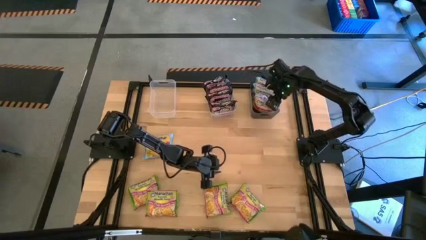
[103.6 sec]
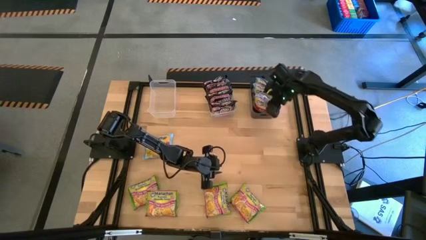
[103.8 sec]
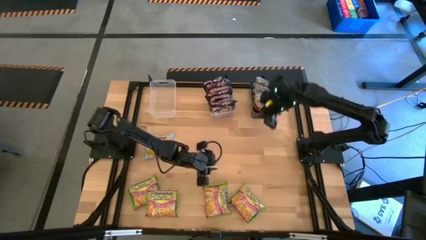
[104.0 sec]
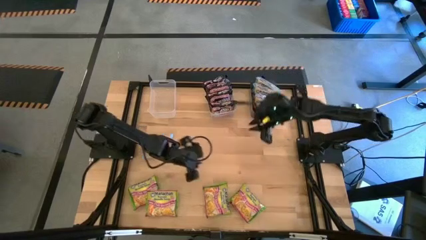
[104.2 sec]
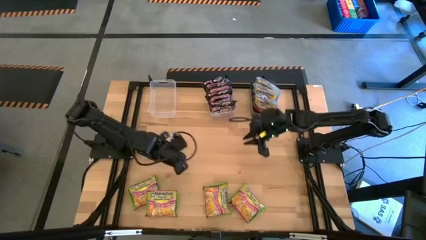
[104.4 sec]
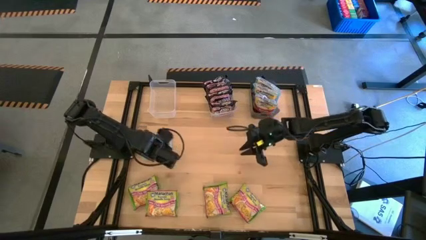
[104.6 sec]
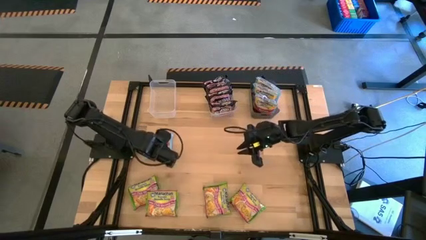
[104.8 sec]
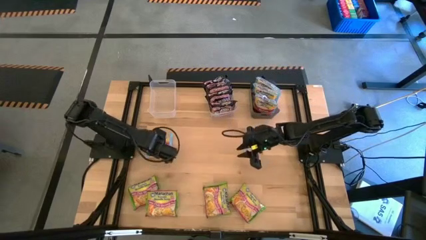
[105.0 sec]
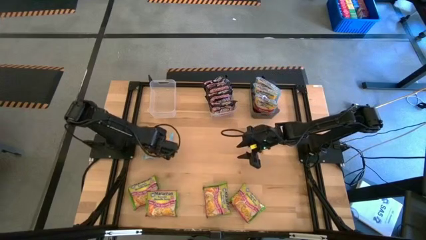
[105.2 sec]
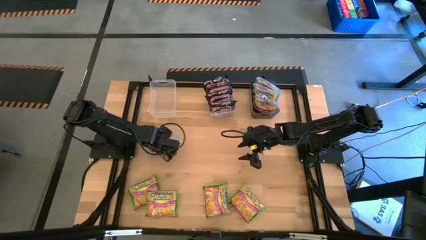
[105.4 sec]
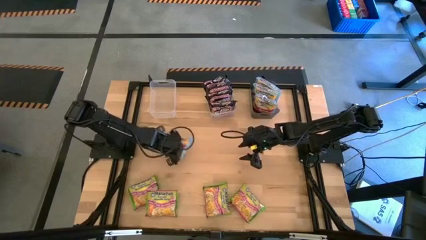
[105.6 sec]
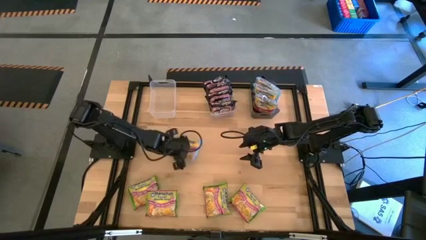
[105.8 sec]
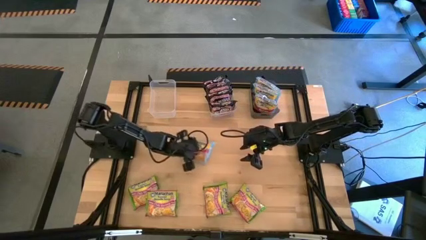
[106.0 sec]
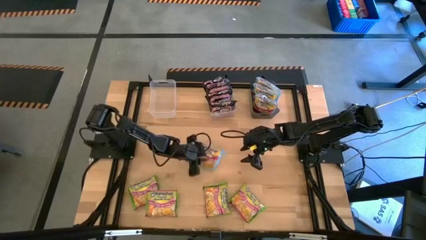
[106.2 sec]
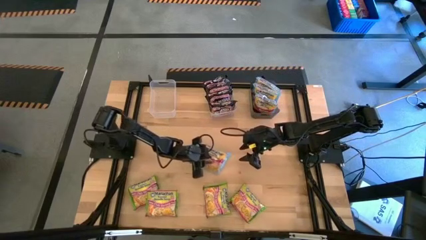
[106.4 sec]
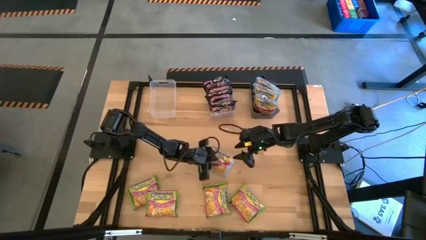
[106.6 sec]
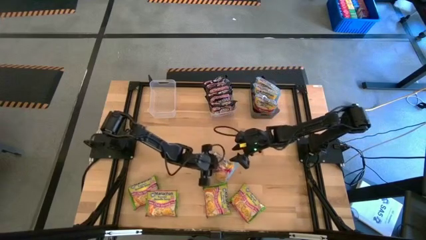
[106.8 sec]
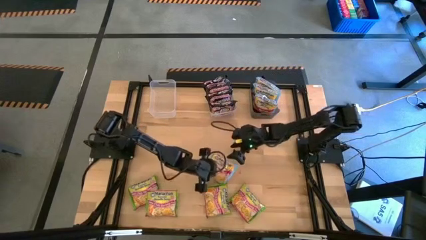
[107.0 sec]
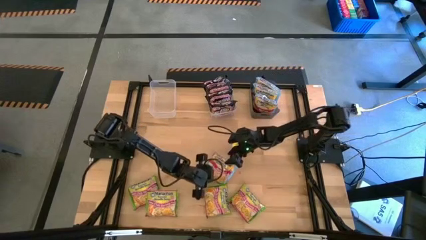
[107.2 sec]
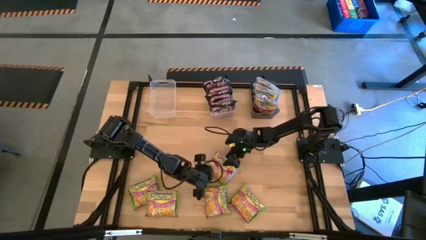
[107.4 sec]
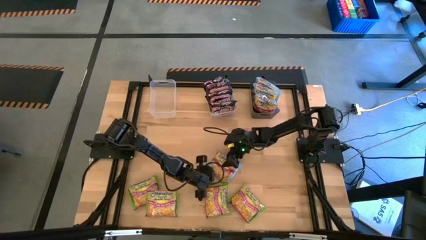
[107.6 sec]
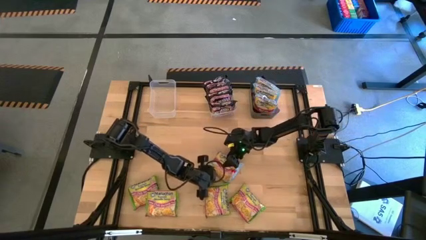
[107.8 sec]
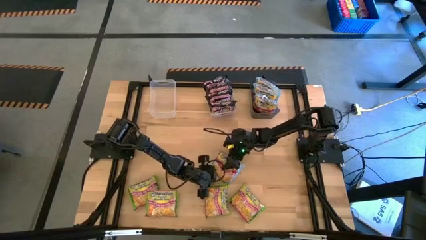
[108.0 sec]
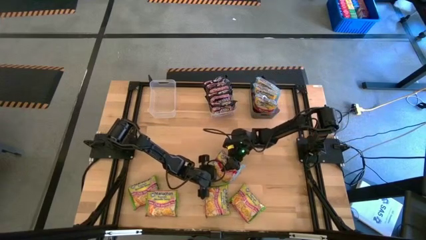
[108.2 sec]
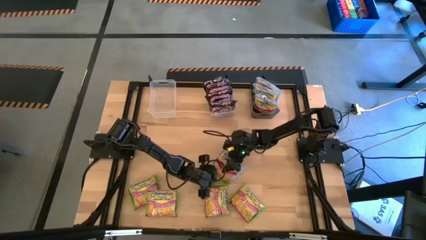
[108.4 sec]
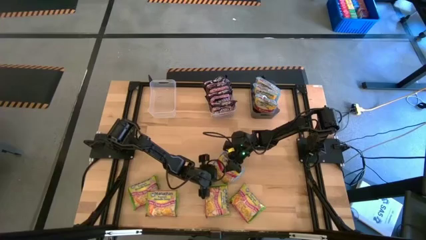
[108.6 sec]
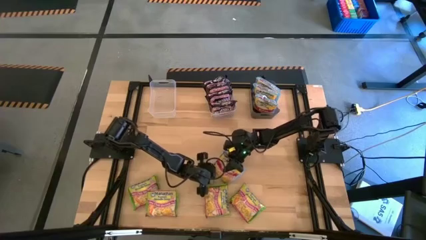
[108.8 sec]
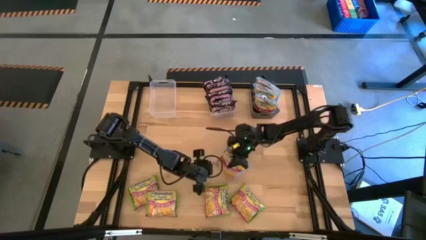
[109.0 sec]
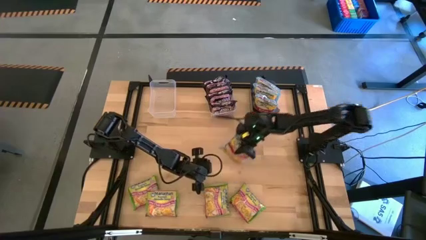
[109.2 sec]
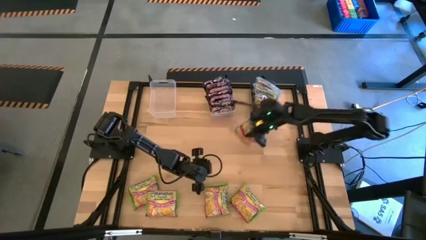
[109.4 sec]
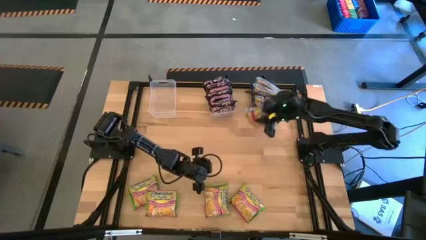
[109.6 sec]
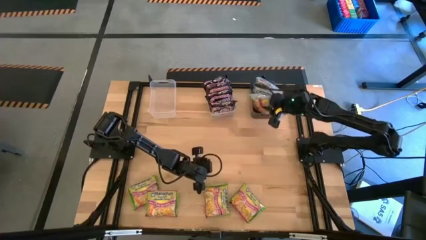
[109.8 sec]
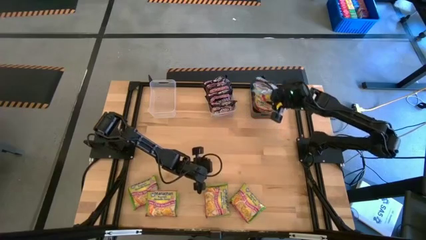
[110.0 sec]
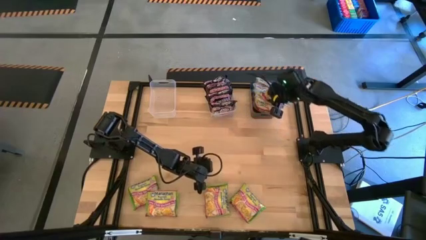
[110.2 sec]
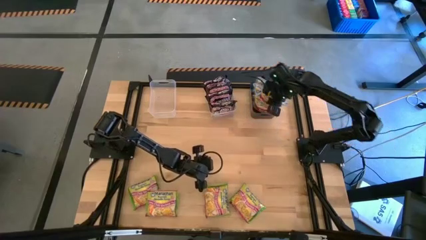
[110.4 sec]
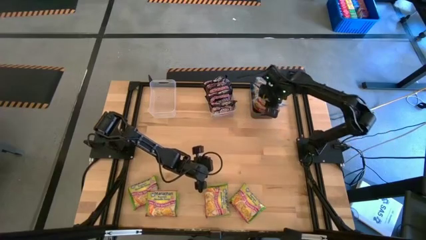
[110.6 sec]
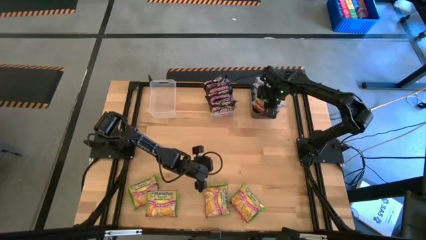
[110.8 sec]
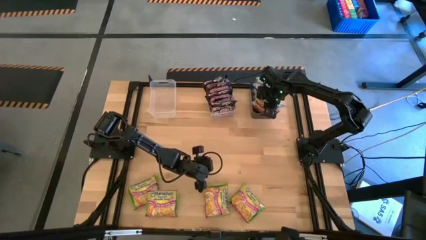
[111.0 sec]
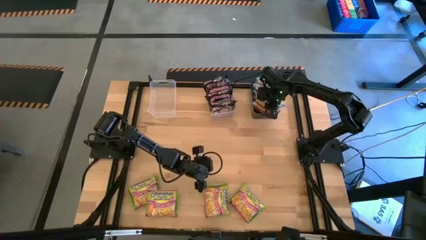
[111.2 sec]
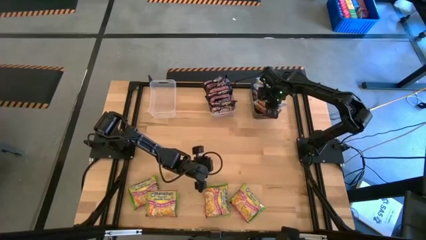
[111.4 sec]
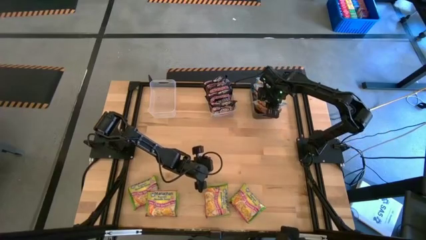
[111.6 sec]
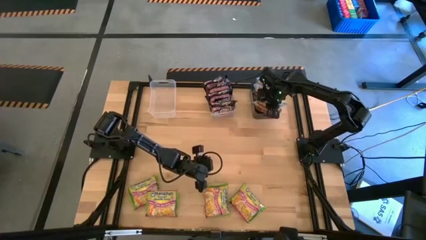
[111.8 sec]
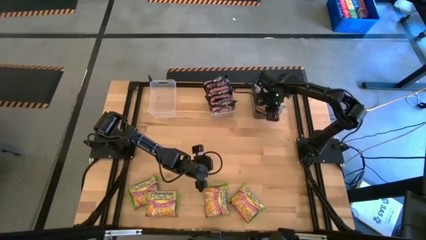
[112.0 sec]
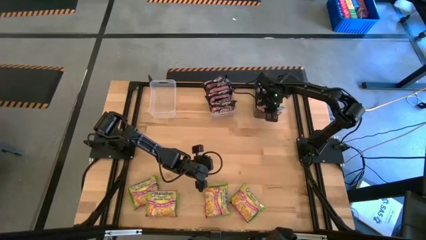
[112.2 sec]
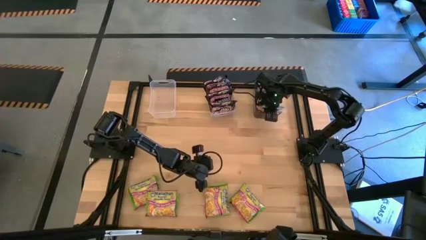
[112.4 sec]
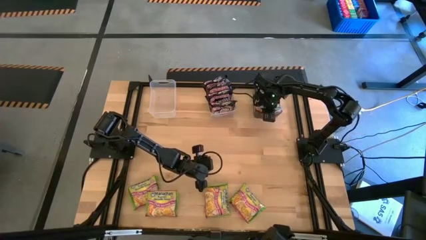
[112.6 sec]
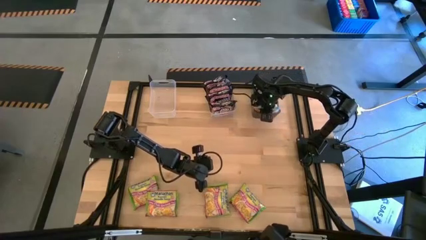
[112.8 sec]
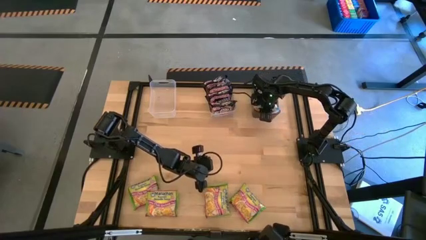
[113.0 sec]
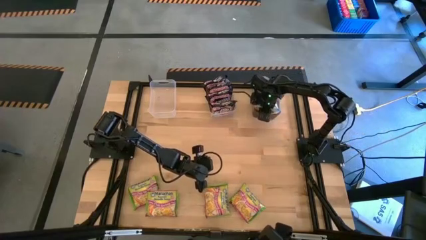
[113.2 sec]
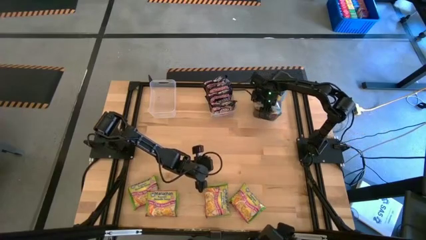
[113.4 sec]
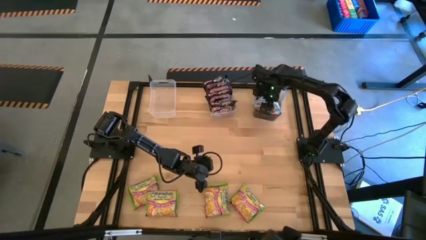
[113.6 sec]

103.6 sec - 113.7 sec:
Task: Sort Maruchan noodles
Put the blue noodle pack into the black bin

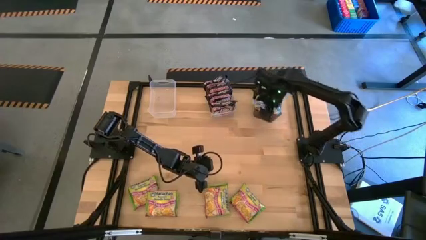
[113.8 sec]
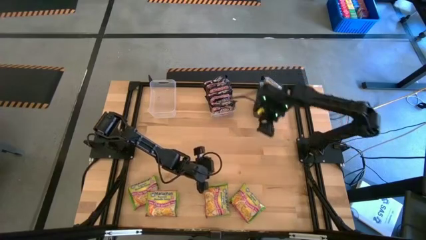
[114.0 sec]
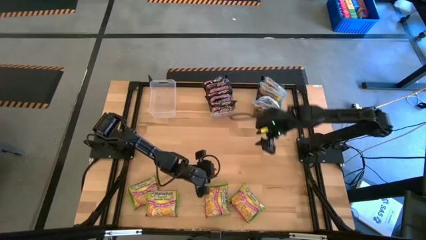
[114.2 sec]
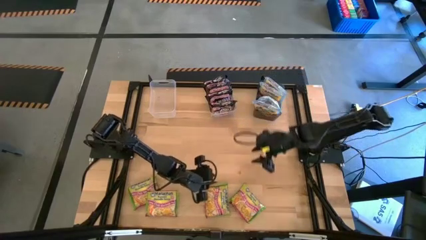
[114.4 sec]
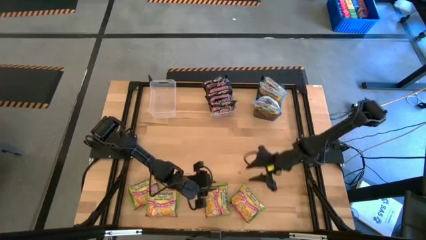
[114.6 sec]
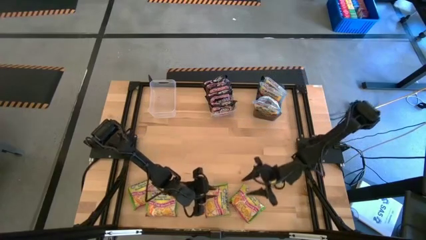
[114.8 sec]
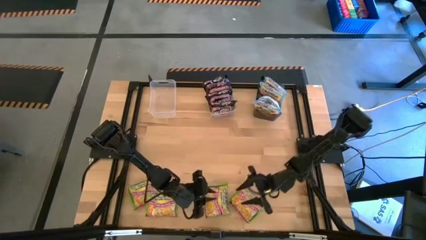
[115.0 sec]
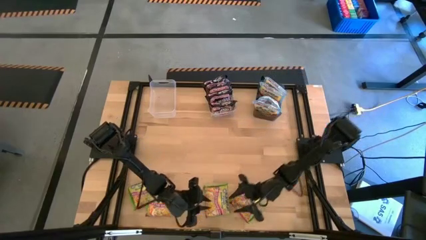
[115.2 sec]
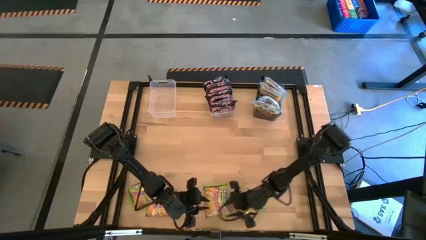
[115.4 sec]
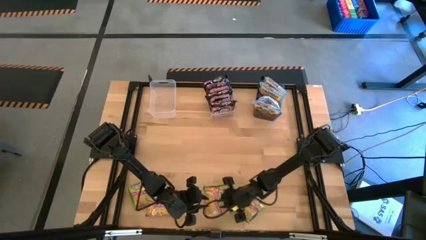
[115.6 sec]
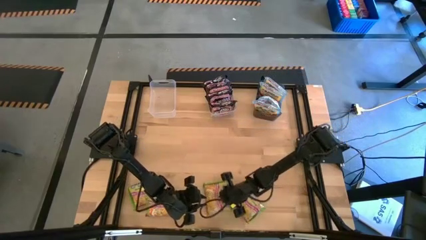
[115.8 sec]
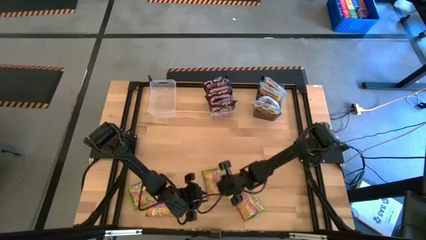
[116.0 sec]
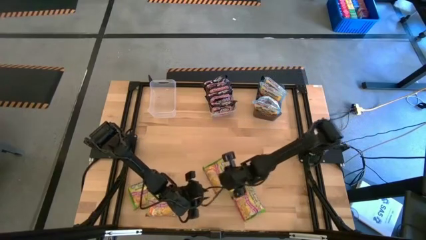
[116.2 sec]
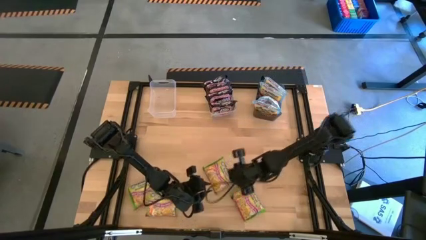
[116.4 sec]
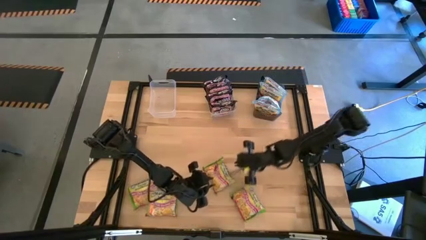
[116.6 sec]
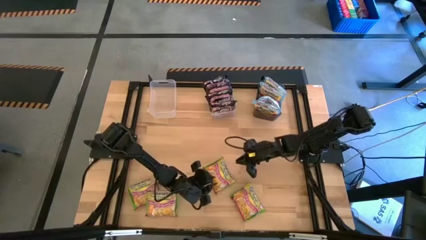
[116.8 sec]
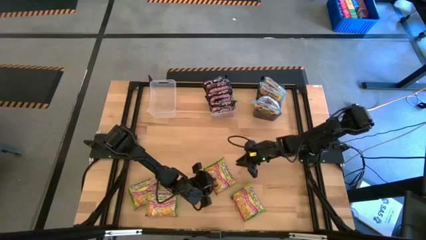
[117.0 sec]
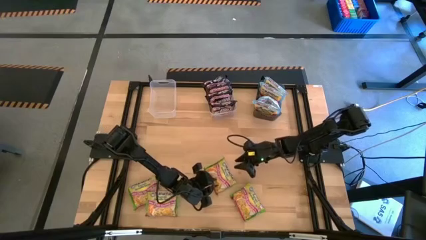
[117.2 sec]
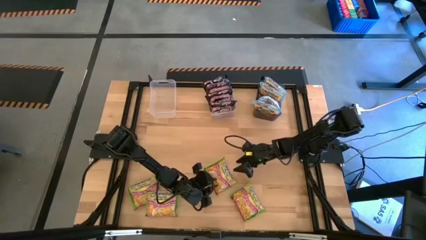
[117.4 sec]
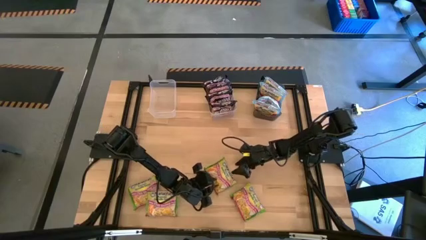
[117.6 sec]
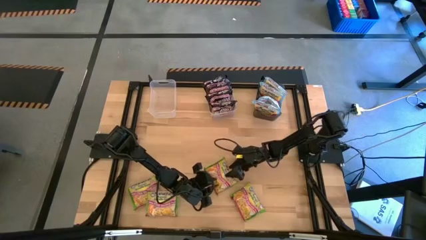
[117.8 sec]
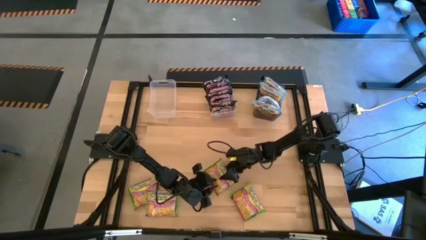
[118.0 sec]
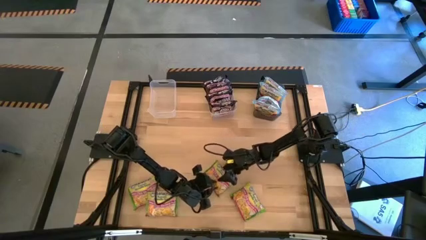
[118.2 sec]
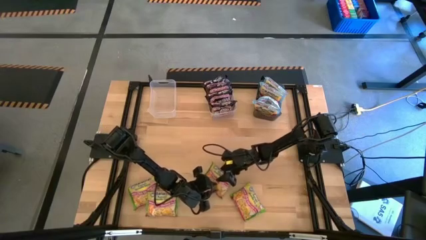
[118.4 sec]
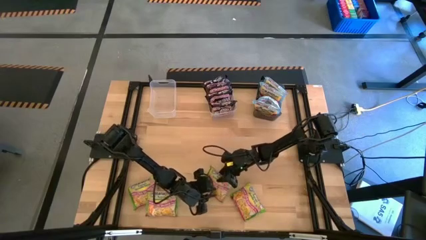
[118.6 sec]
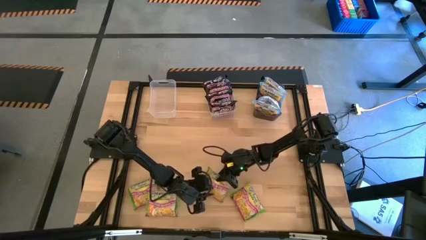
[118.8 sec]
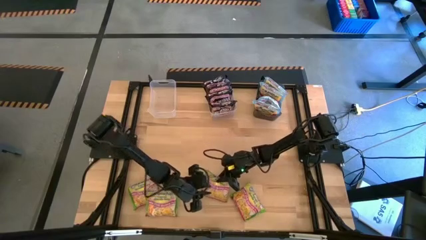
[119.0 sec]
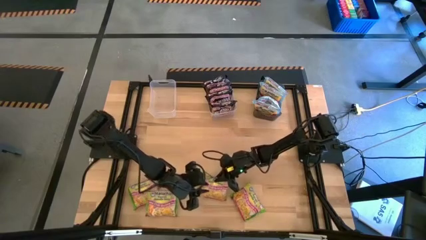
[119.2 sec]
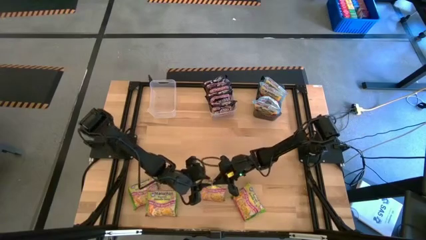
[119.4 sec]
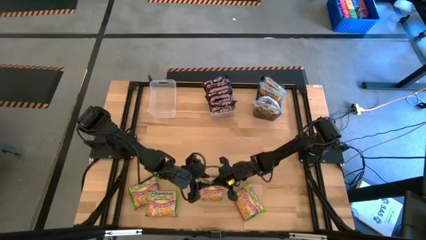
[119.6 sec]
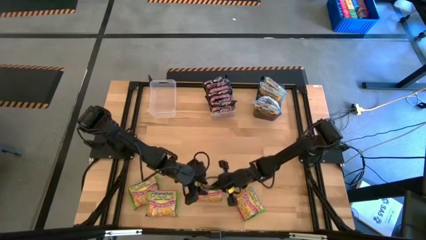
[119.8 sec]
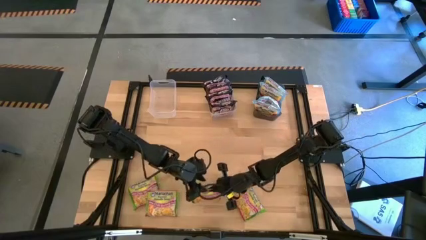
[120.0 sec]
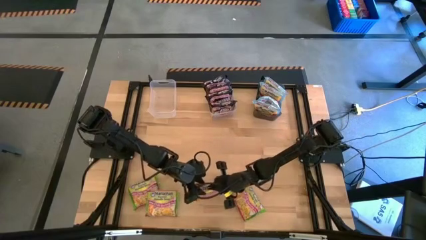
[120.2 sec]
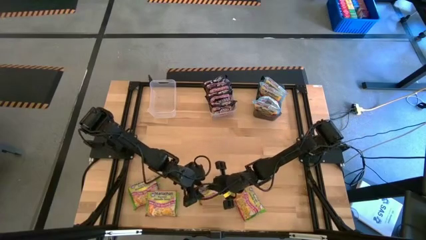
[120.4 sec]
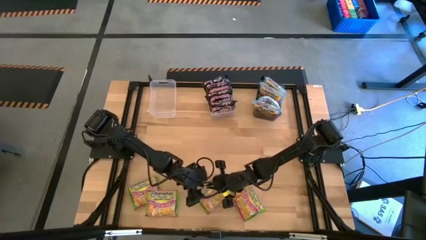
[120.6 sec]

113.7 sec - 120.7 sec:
Put the green noodle pack into the left transparent bin
